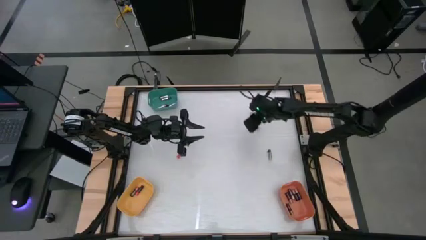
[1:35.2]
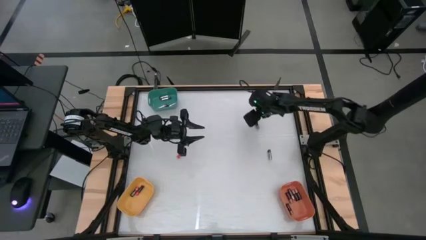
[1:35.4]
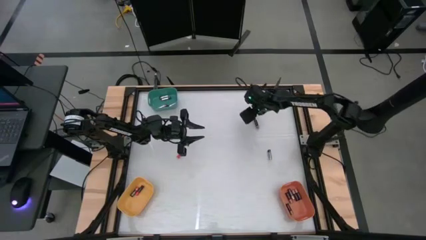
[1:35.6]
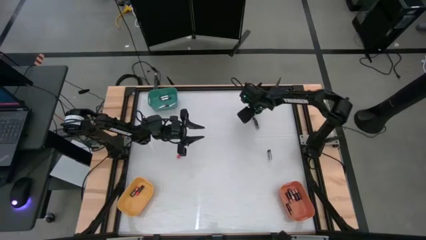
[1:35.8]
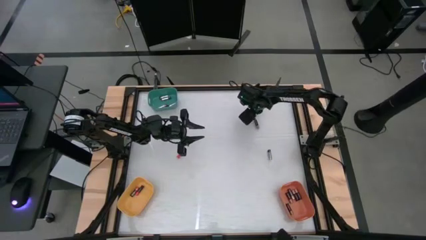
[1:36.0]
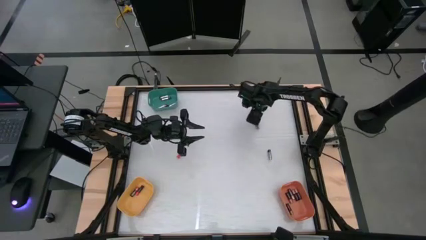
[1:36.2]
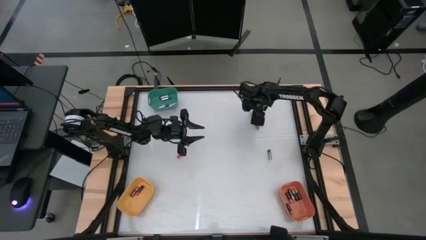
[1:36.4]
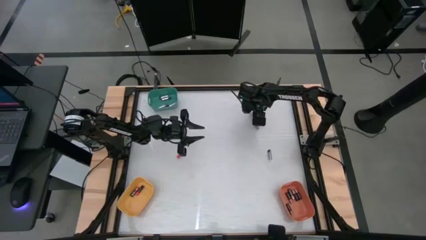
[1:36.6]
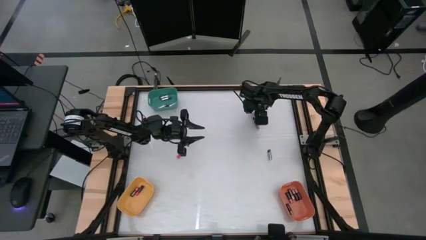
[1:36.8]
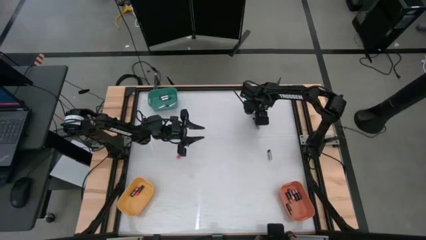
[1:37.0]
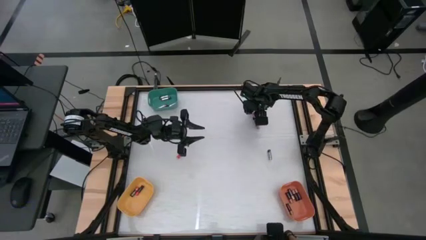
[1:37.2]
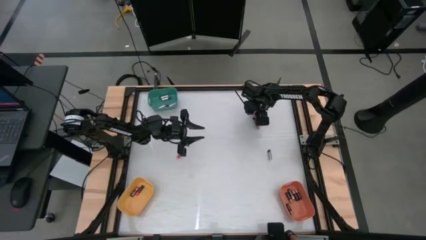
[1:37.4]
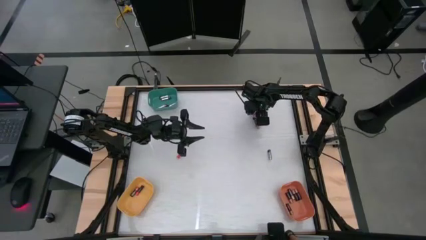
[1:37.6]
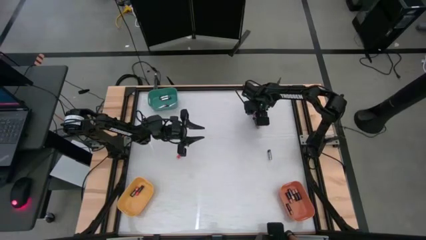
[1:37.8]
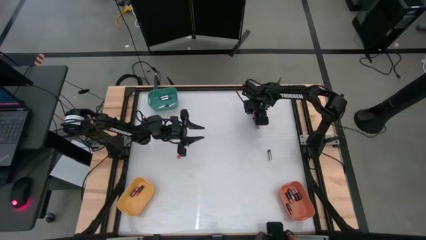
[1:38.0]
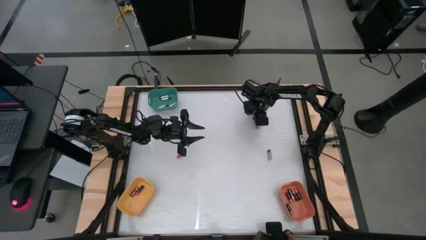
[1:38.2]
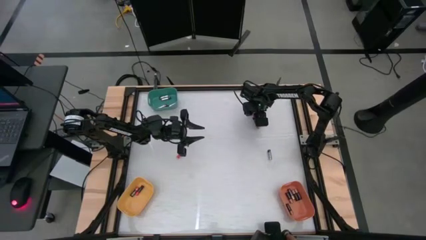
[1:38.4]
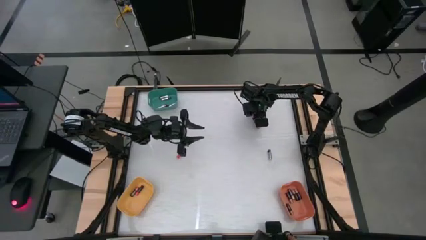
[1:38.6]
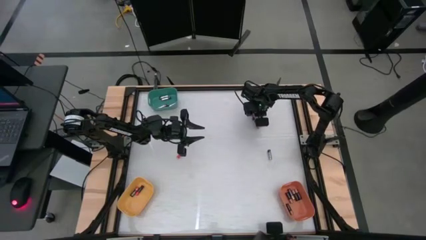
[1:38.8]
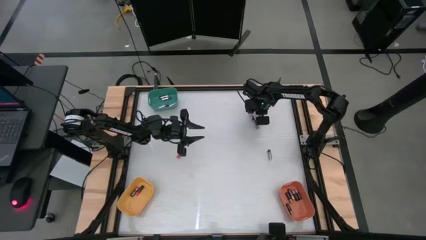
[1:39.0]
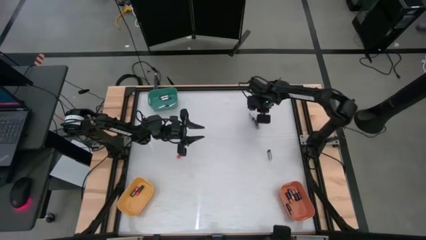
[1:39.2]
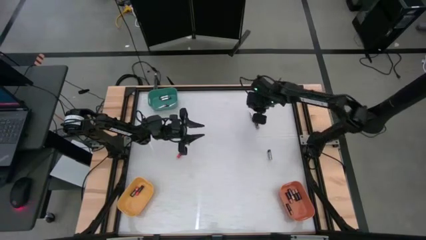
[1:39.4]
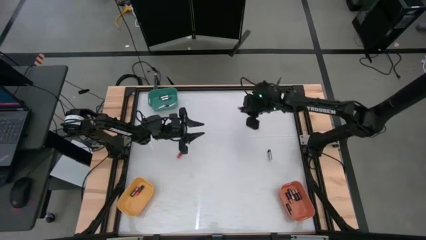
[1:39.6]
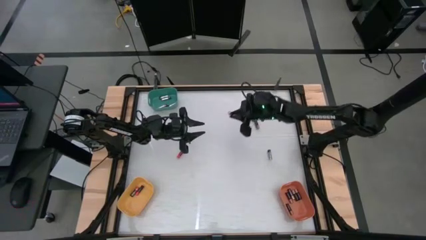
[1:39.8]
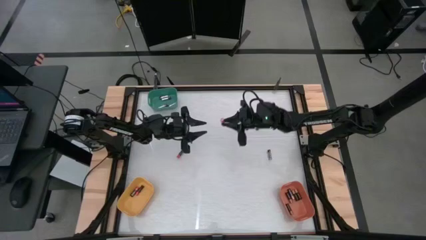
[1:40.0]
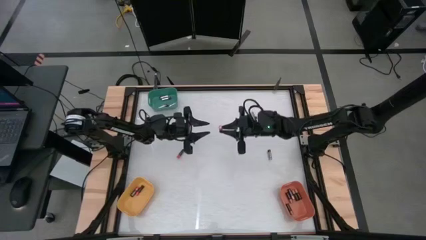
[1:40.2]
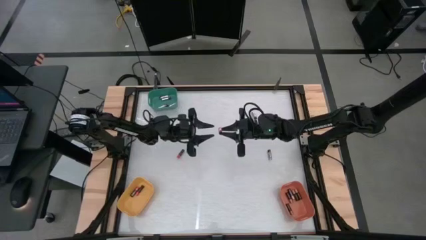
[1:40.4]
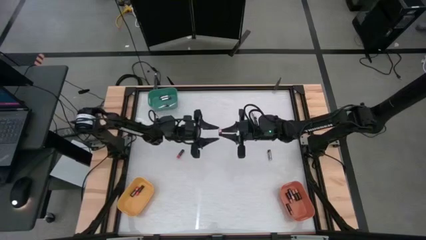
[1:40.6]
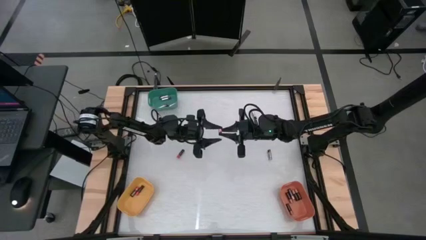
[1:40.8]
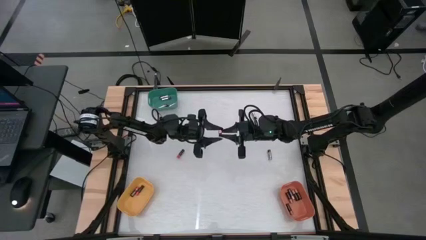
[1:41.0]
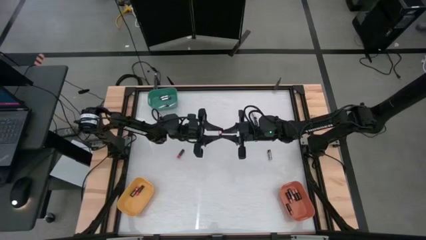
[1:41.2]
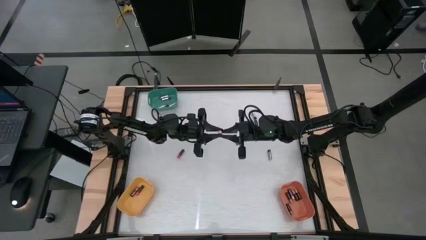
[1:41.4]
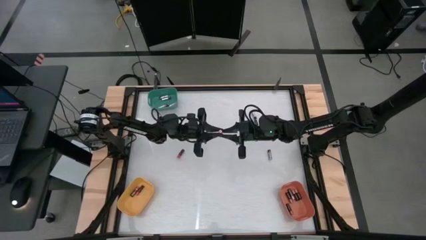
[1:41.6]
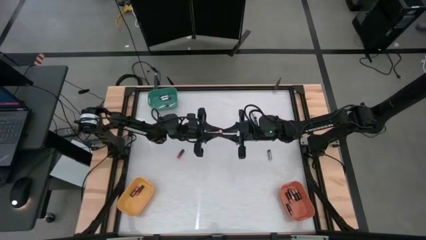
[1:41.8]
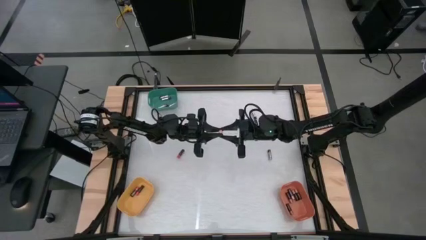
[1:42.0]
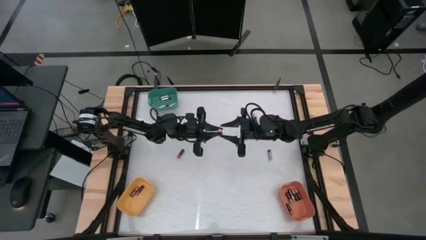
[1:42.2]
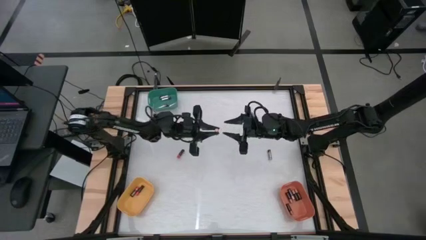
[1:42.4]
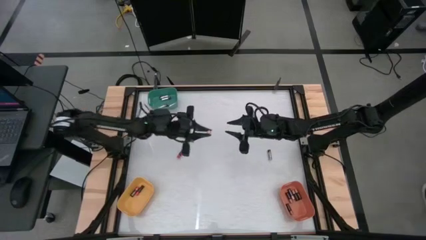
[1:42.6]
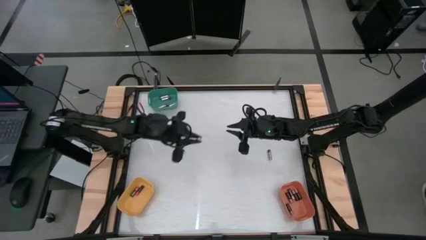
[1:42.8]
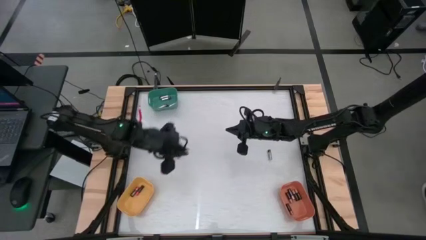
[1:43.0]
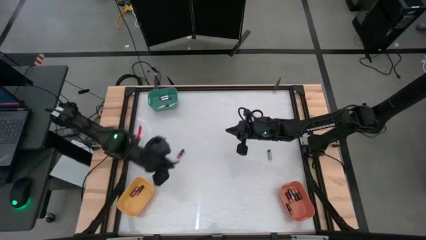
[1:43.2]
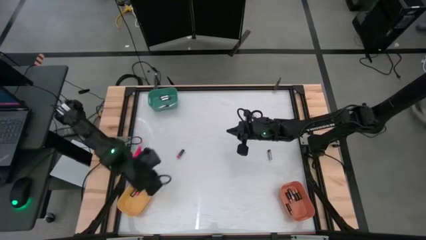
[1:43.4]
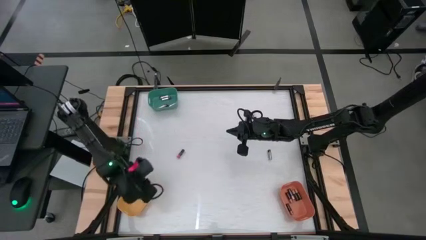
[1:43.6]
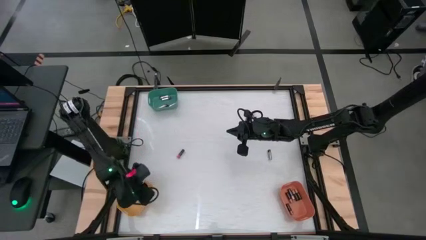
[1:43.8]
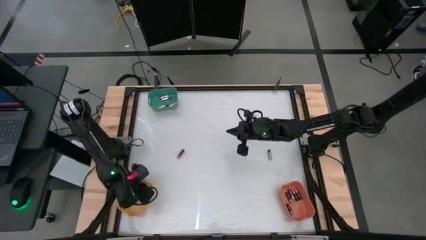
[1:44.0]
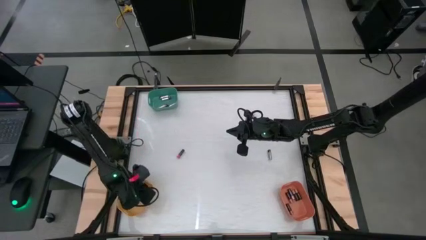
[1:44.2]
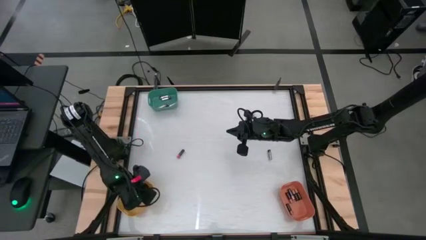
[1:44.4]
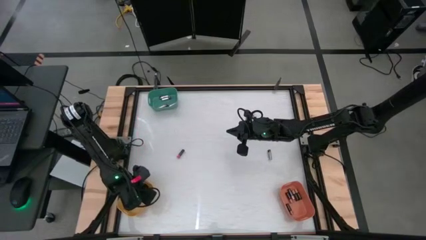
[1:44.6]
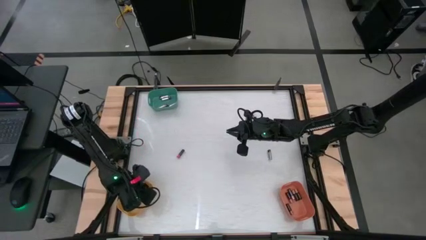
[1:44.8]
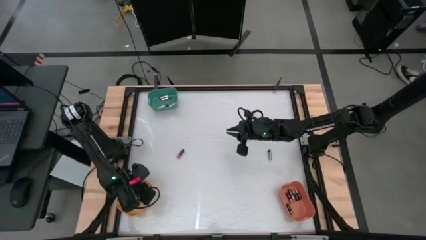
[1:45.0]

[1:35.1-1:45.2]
Task: Sort batteries
Put the top right red battery into the yellow bin
